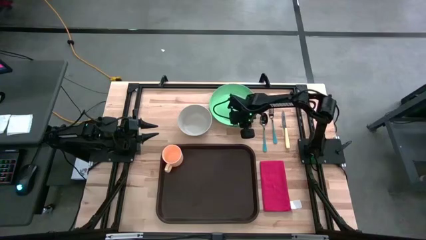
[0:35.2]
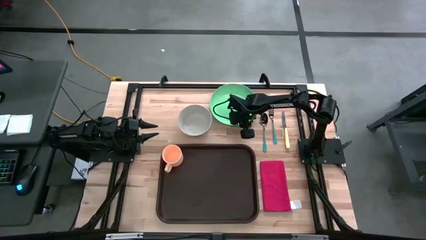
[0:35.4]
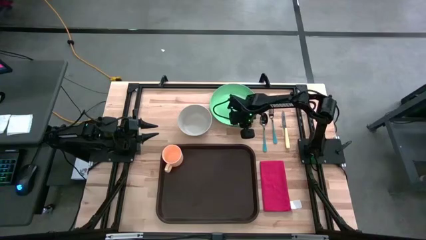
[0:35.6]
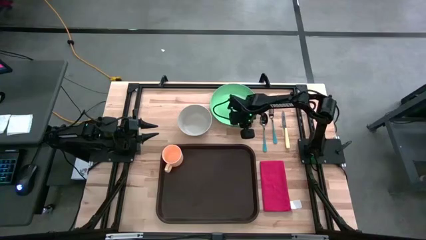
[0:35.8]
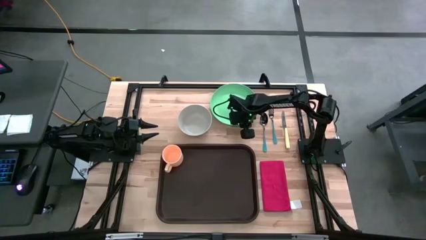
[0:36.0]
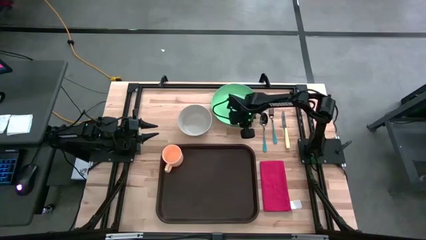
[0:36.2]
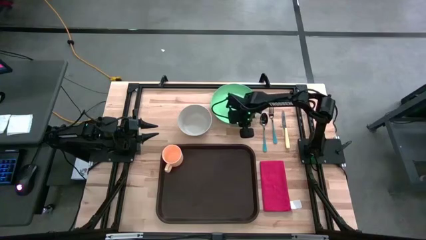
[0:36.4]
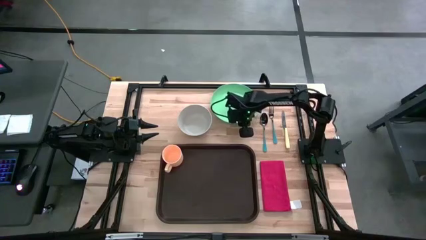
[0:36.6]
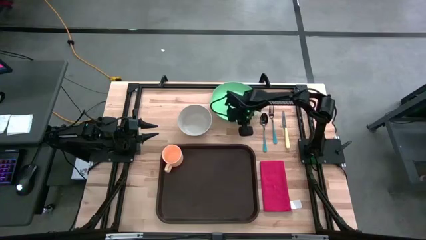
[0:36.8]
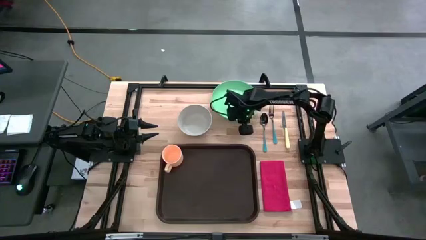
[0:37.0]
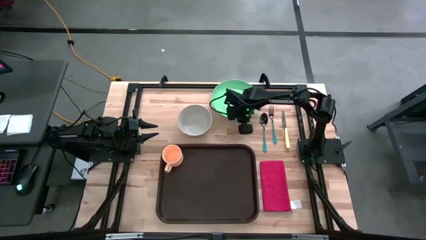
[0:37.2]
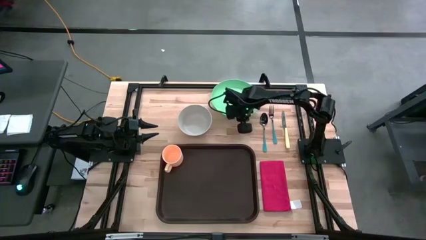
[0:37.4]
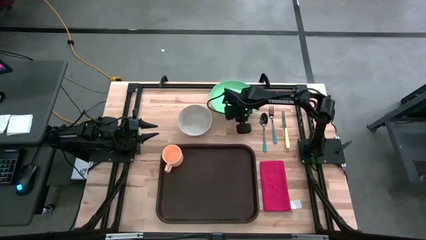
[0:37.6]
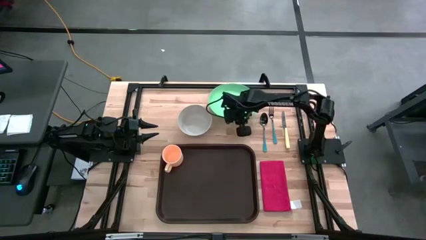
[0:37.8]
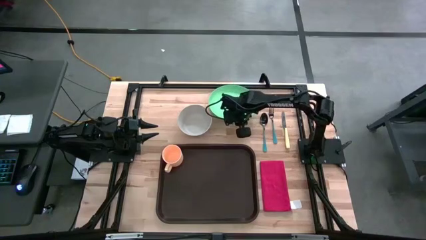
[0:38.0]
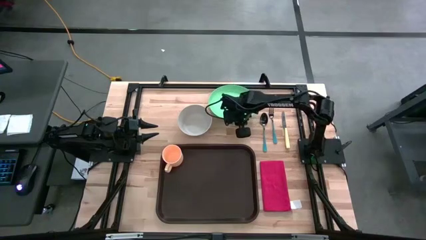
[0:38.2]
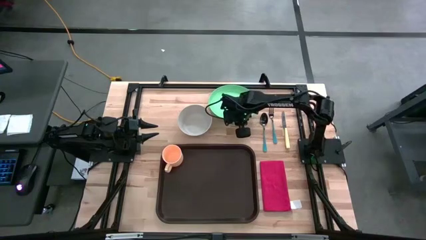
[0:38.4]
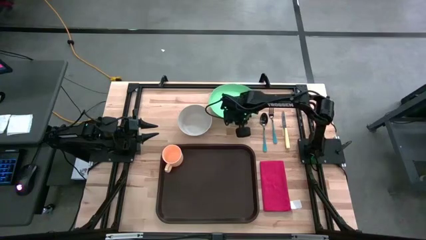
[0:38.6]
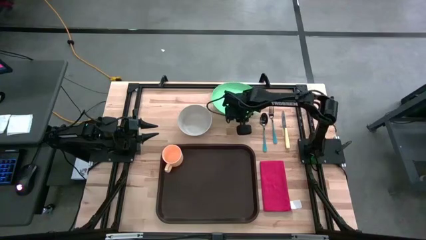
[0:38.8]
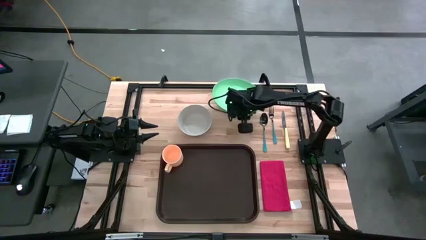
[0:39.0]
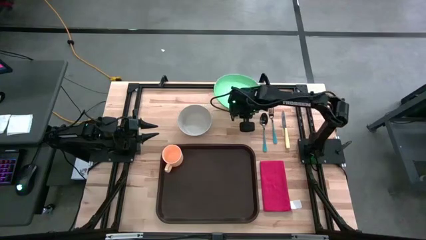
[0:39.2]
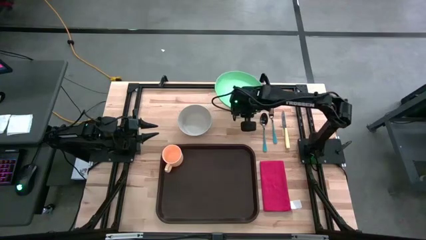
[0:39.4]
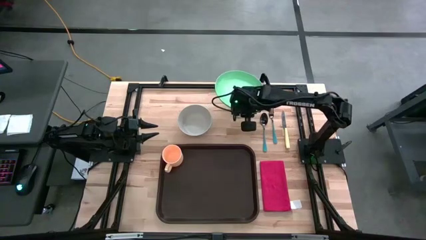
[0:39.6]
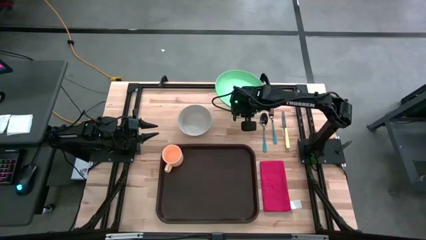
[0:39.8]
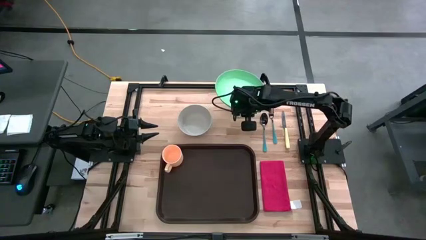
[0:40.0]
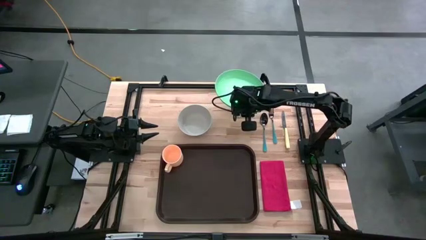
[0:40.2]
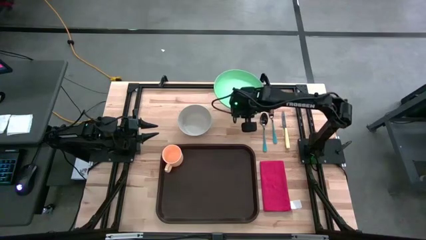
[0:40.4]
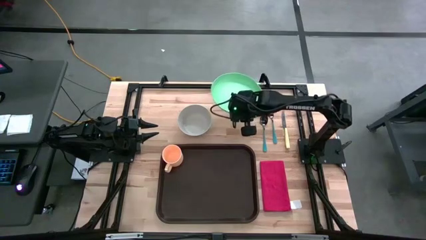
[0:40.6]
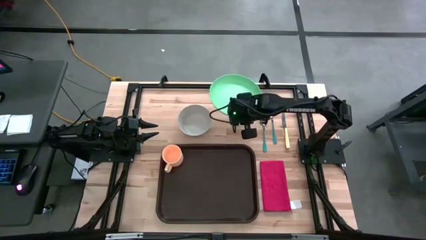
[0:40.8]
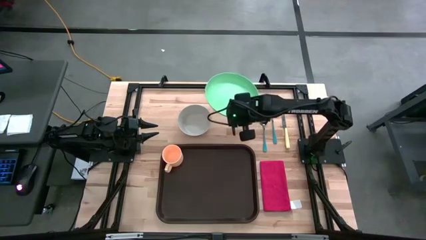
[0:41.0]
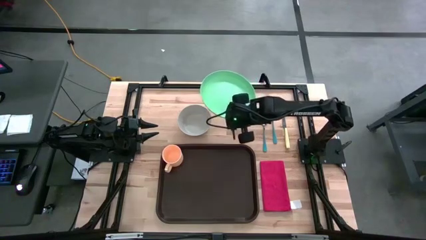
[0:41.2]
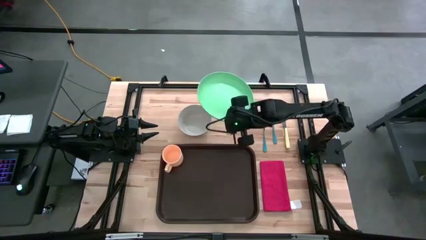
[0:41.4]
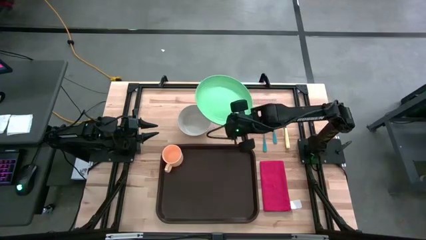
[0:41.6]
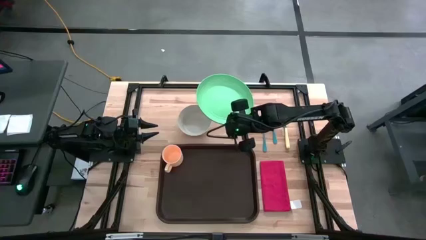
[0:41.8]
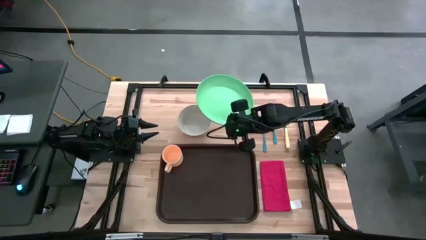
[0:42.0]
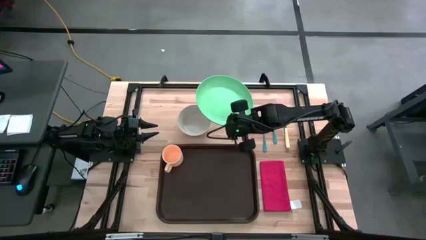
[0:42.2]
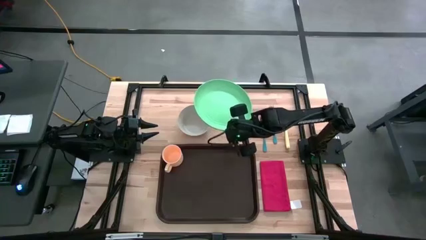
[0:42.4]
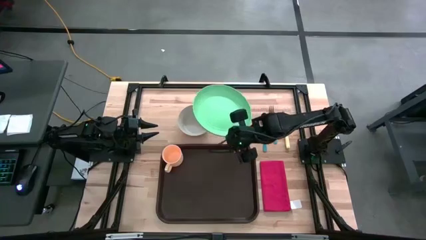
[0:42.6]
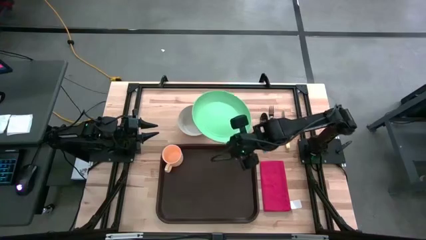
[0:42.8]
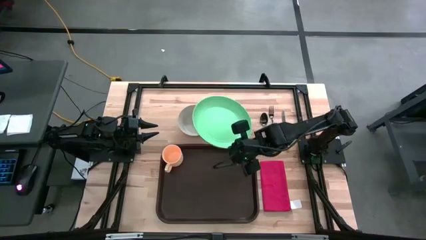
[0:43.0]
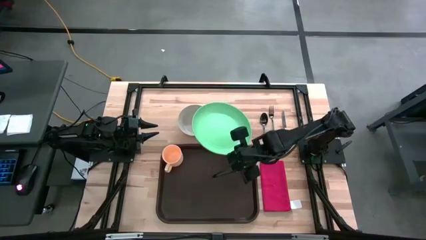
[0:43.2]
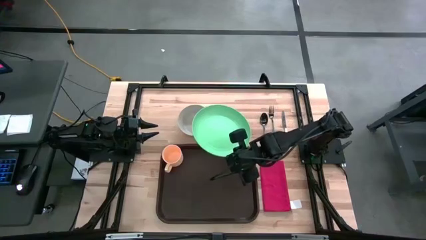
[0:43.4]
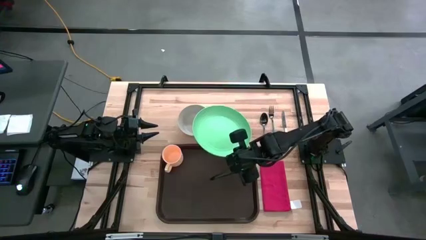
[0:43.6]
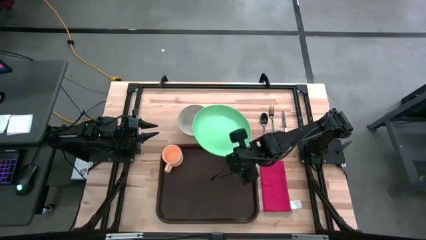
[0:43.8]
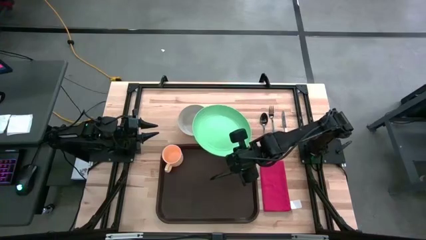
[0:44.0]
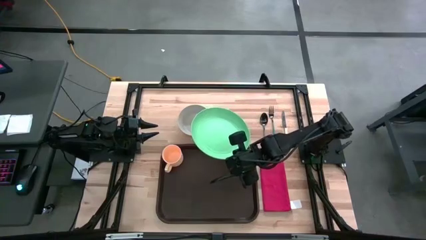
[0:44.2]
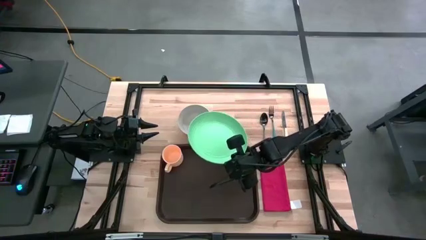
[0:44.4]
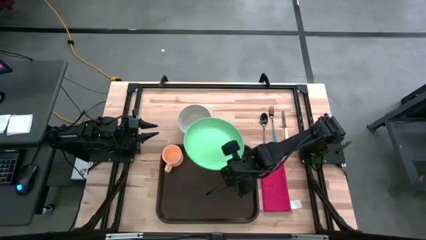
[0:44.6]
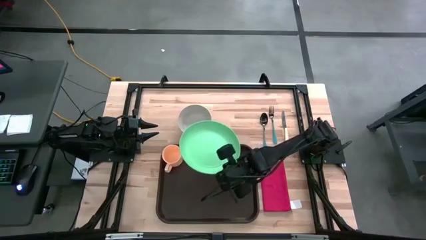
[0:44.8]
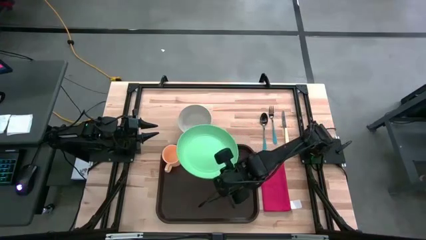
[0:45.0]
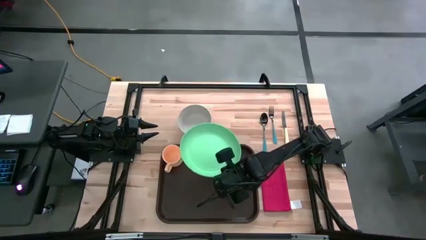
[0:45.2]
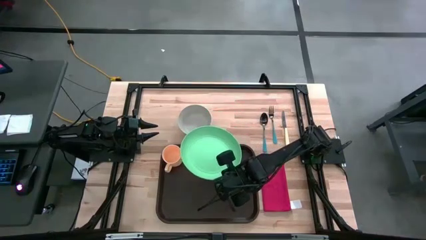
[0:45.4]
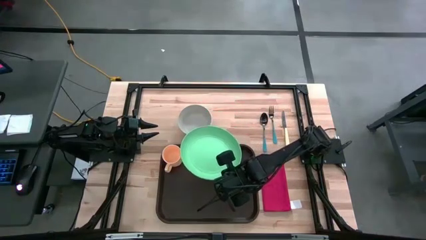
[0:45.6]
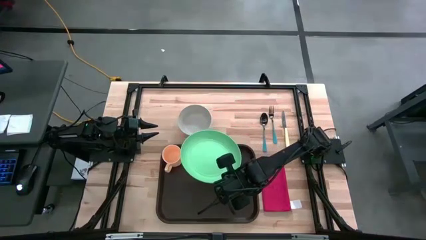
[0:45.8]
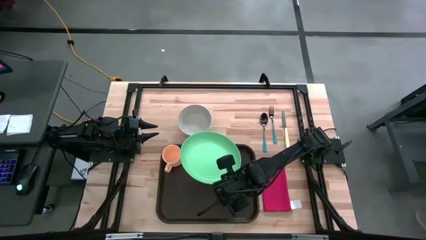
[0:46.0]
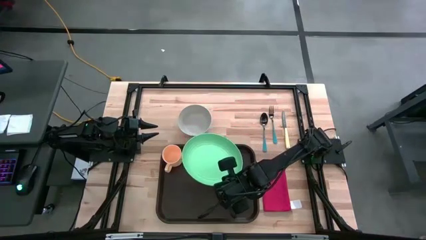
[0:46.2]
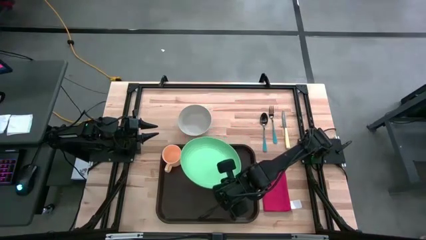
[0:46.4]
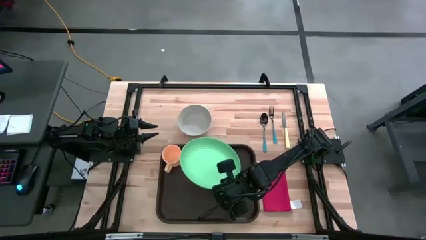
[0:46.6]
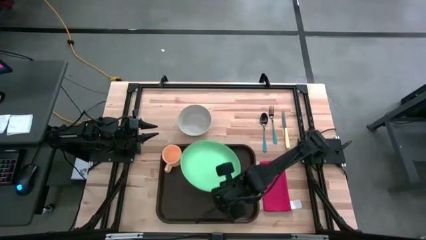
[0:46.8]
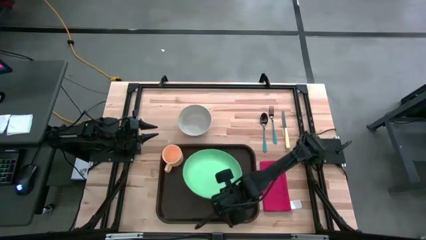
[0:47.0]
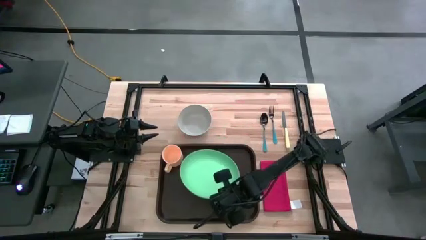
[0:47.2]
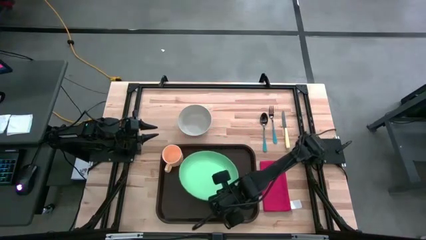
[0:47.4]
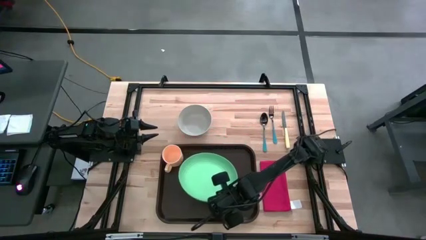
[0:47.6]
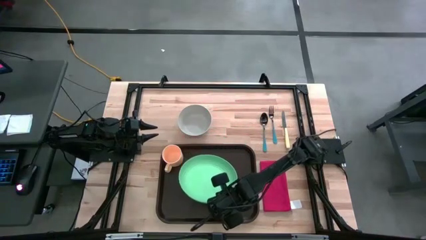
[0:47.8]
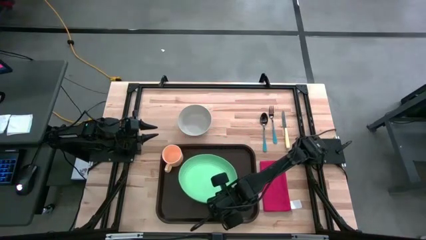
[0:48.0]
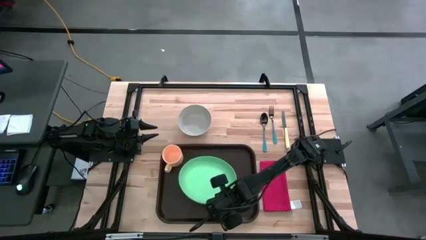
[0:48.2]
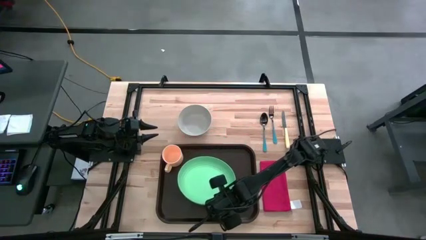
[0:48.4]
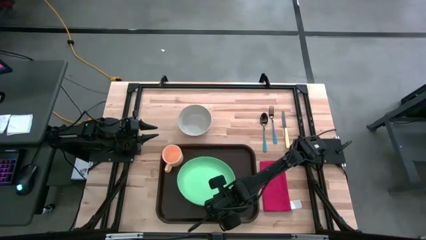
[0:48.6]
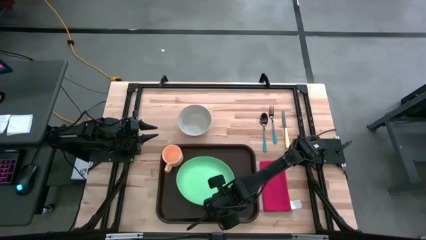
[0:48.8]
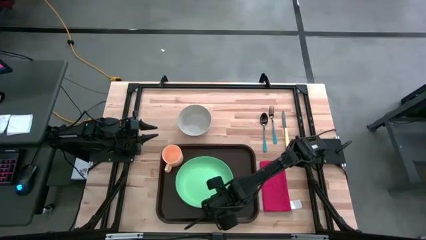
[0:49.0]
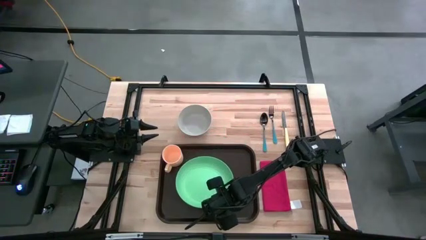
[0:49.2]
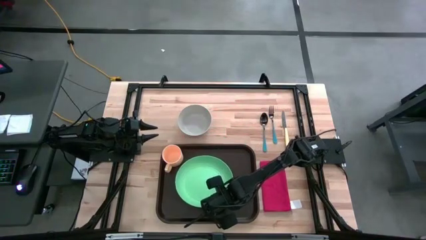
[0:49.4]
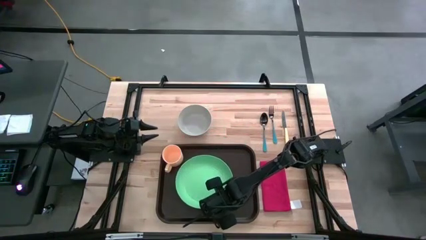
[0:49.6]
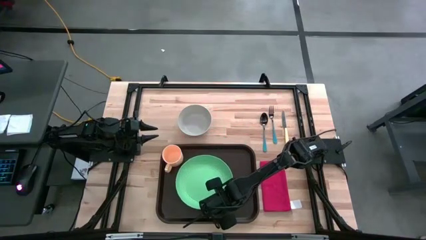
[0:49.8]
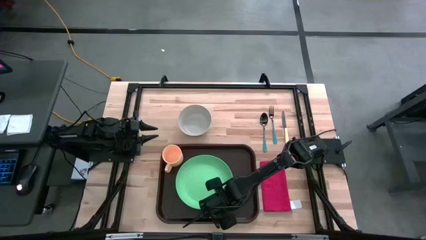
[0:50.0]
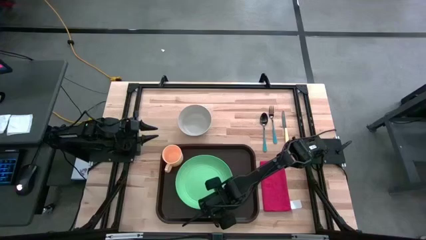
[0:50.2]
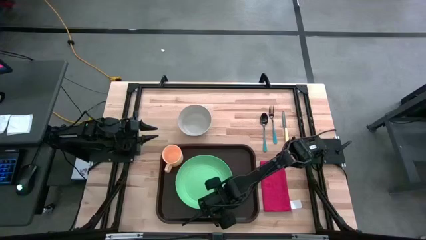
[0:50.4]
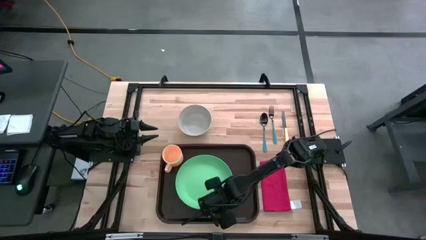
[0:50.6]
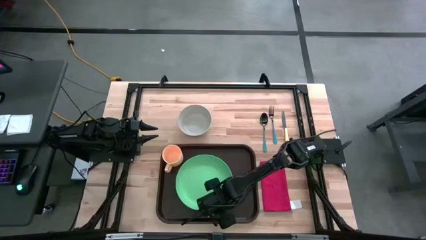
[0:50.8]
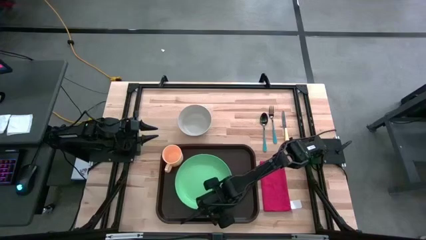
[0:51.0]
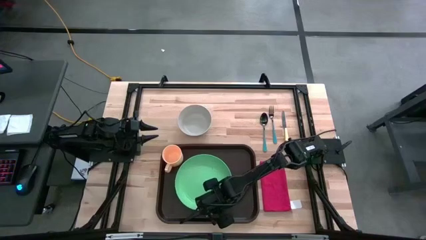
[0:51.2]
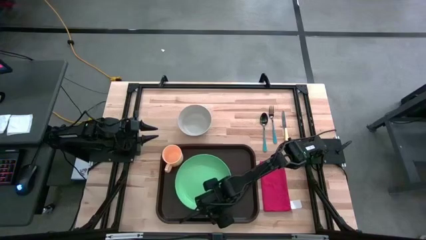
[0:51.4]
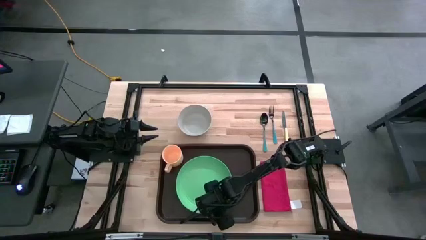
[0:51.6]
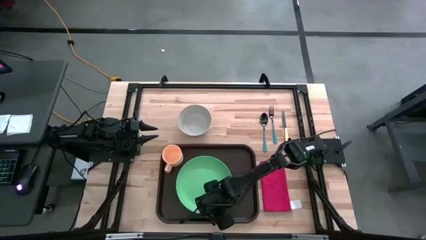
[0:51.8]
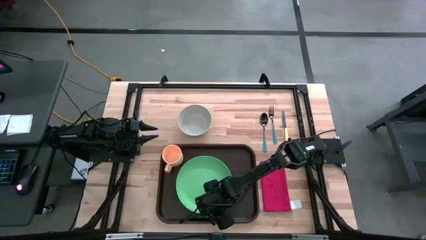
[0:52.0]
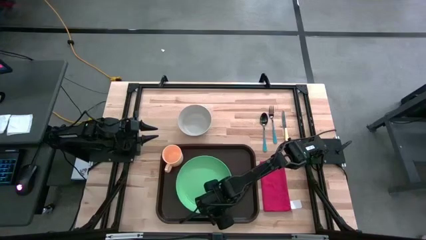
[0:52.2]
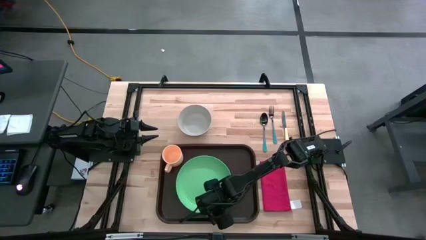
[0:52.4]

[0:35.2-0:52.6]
Task: Set up tray
Put the green plate to the middle of the orange cup on the serving tray
